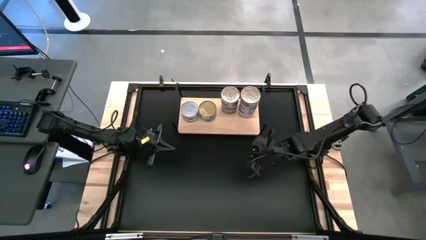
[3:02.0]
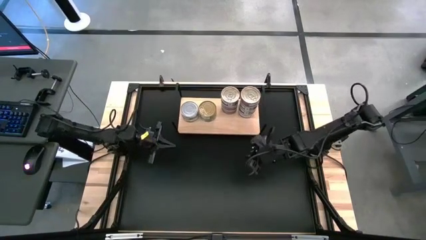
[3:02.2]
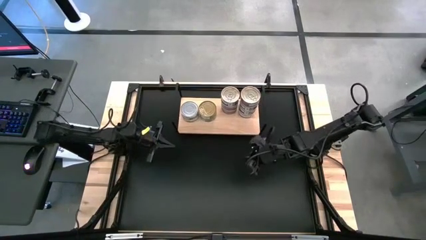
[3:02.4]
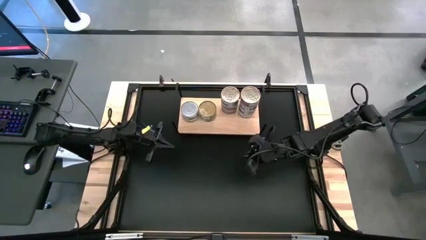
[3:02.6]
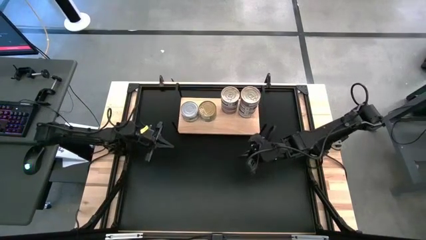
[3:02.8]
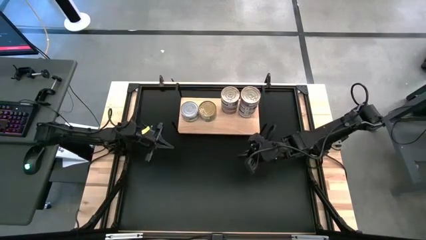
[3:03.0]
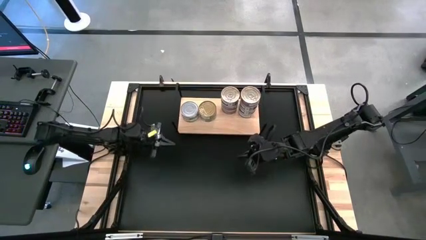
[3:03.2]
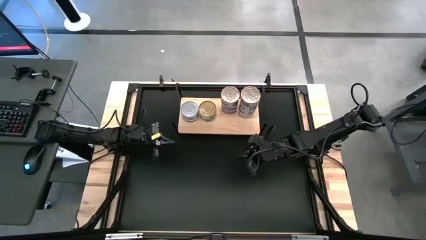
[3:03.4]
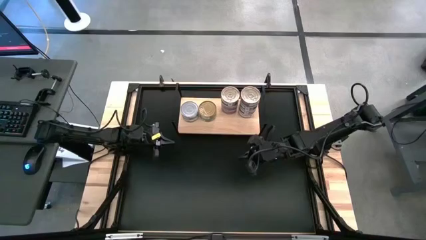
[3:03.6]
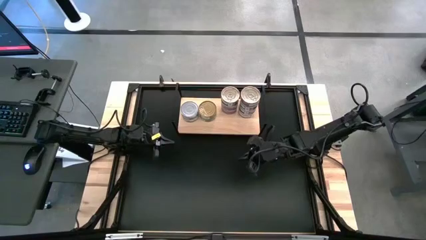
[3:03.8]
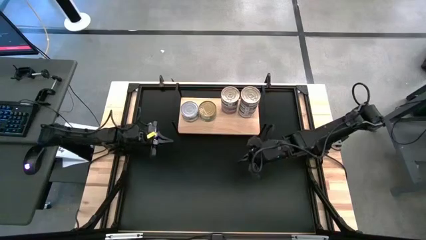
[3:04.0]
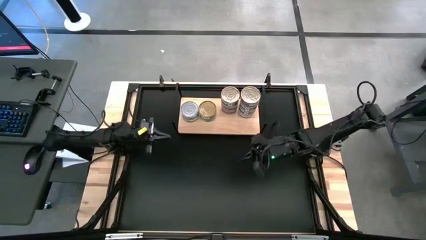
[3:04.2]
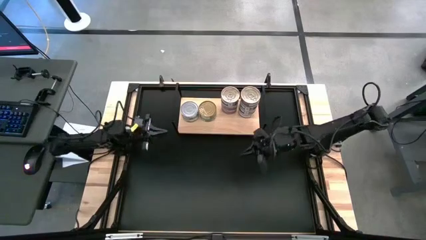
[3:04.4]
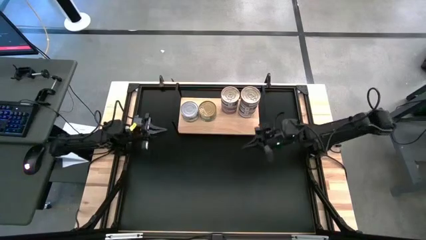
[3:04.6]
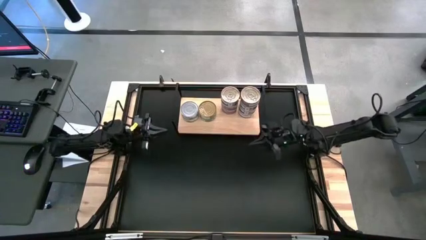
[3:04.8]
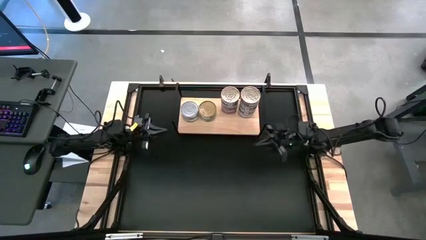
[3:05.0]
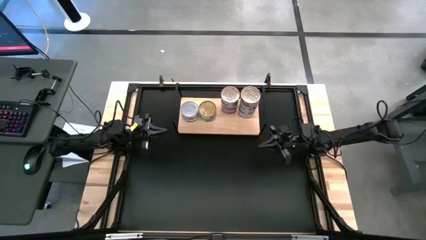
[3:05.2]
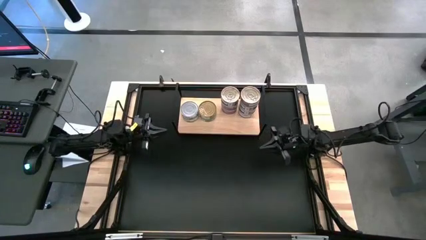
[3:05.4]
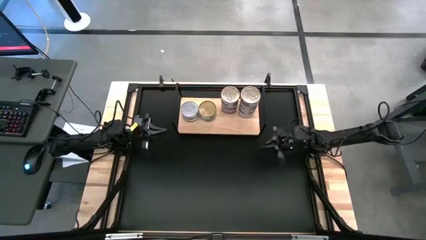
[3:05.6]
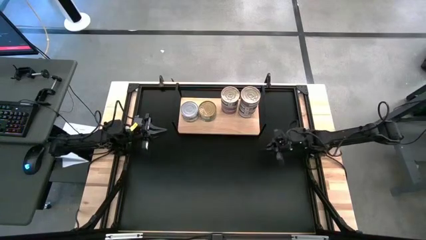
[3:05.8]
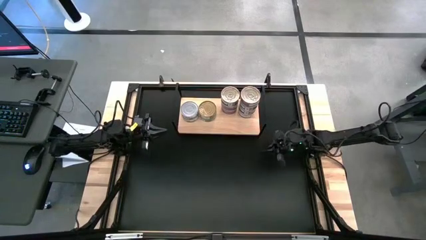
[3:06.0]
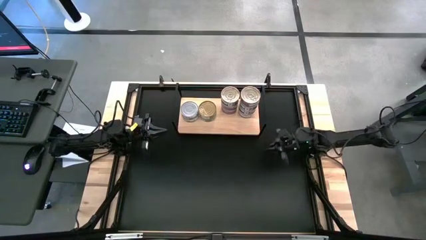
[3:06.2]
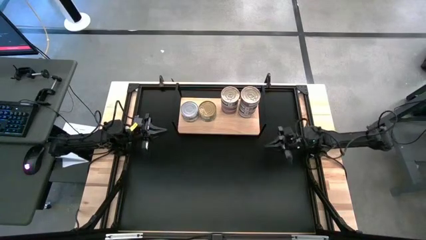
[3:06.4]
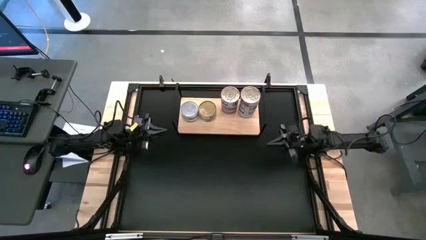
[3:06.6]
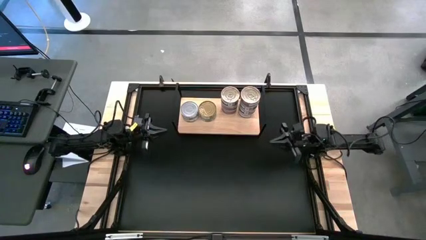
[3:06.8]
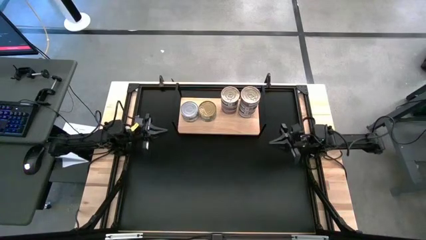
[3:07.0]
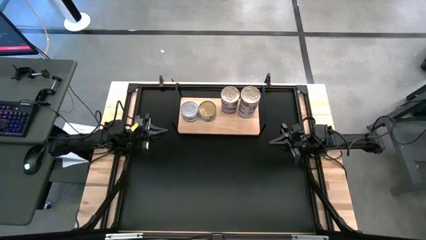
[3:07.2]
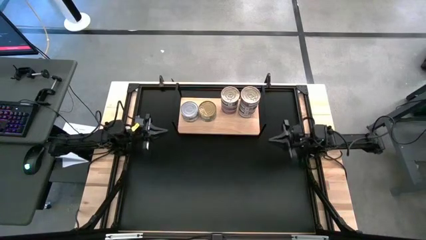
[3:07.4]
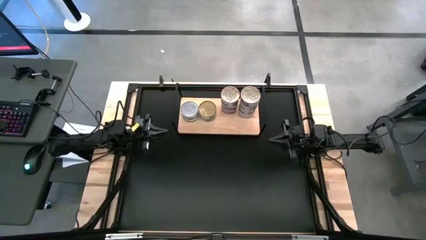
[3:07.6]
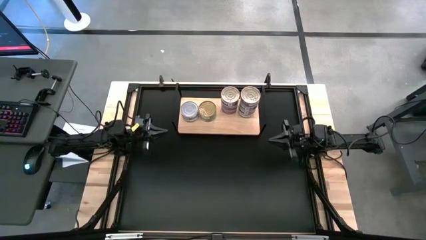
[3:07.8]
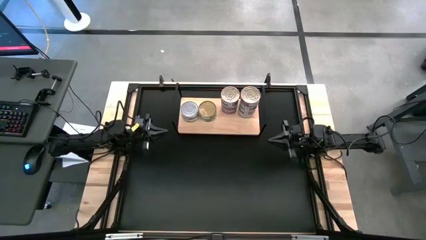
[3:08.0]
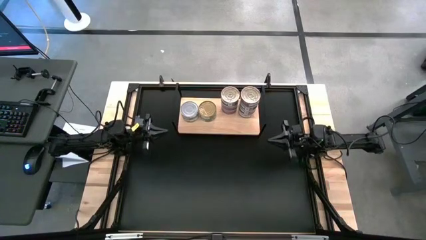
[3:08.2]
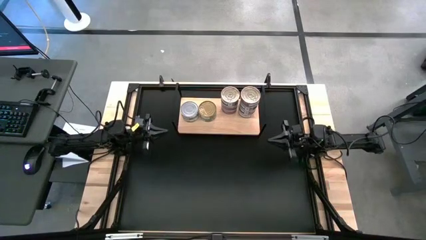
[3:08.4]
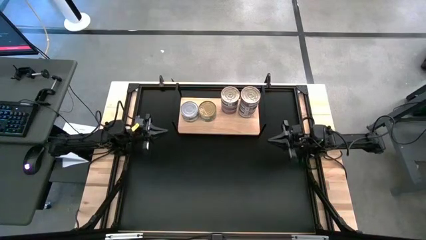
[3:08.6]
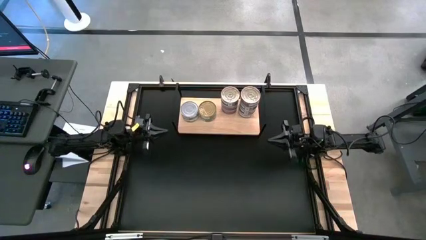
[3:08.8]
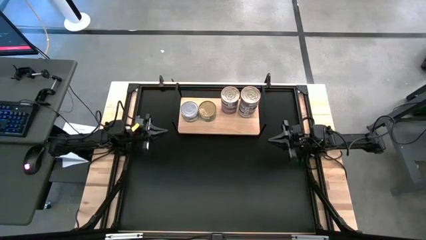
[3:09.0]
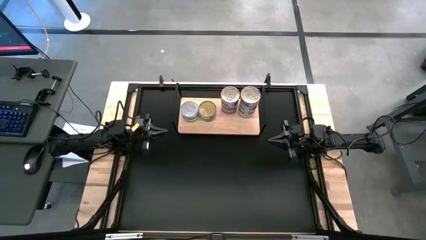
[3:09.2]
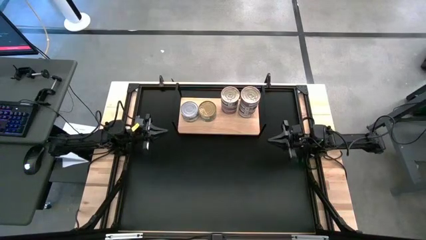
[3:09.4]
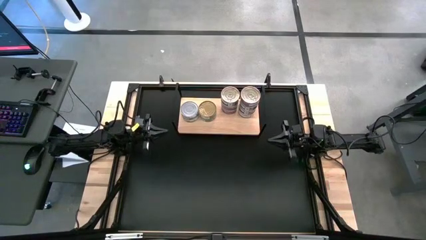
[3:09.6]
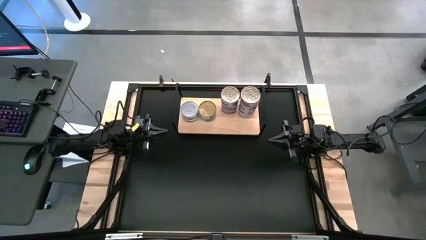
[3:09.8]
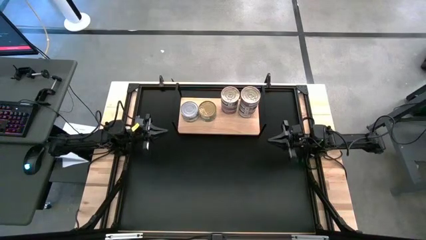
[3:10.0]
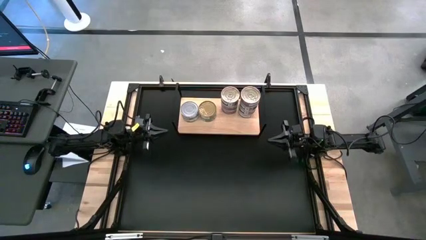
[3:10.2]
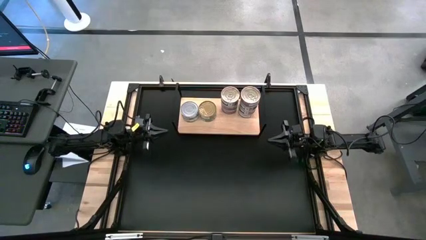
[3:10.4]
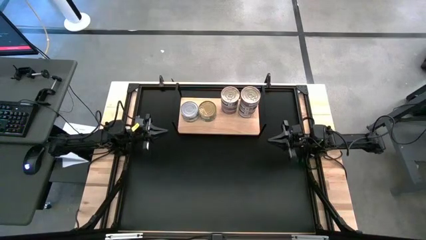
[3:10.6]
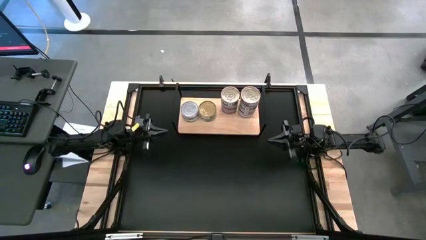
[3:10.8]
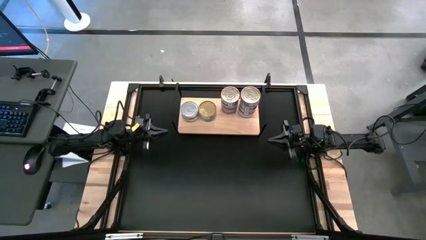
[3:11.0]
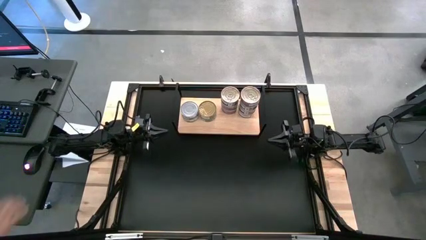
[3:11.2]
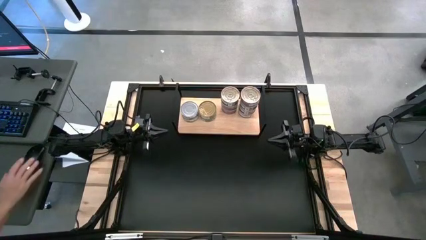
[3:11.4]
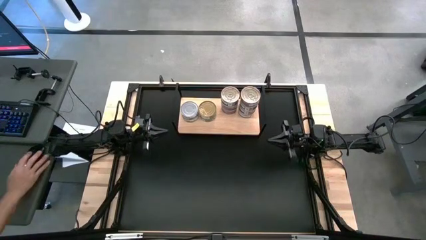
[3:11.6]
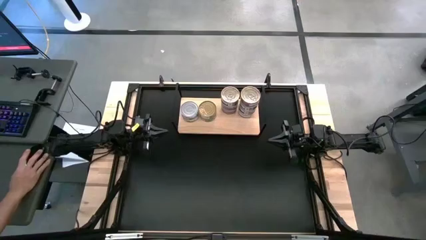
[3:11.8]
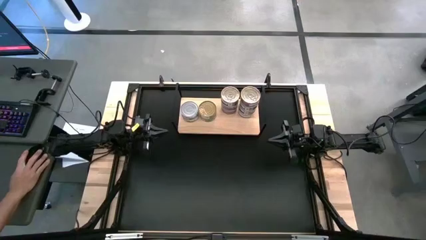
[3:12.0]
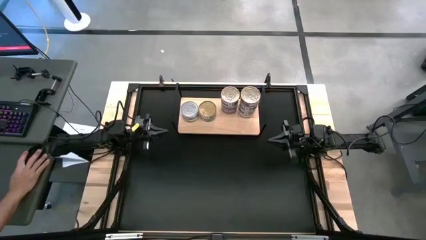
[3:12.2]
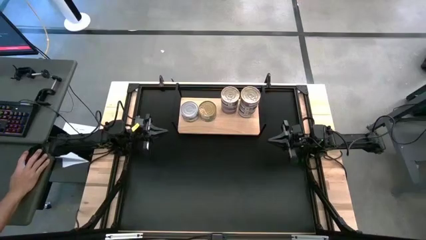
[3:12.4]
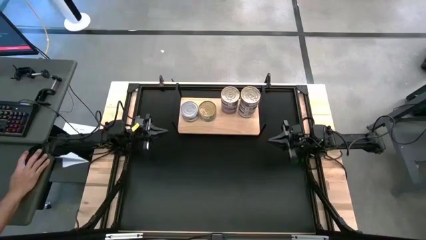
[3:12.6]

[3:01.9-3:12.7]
Task: Stack canned seafood by type on shelf
Return to Home Position

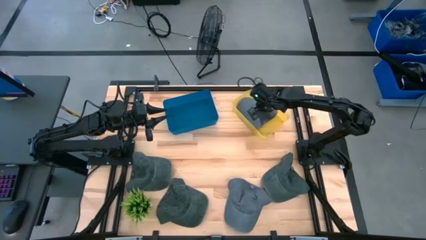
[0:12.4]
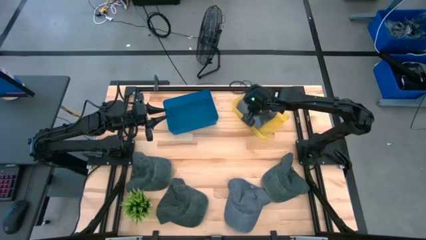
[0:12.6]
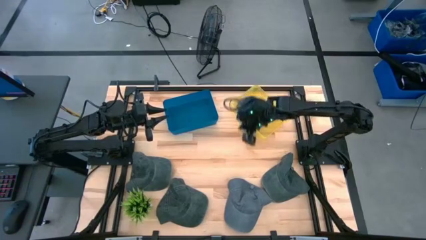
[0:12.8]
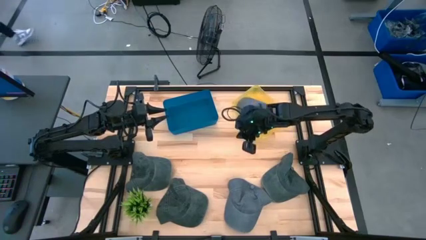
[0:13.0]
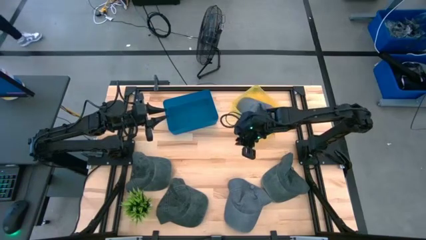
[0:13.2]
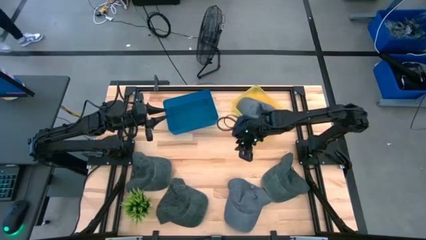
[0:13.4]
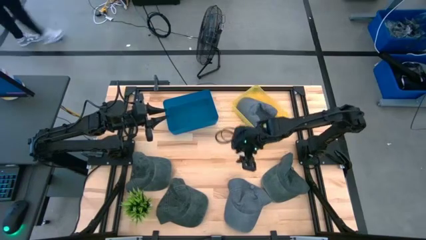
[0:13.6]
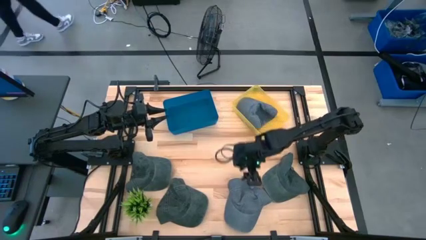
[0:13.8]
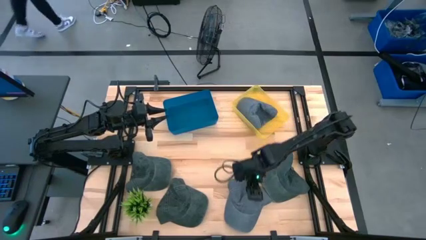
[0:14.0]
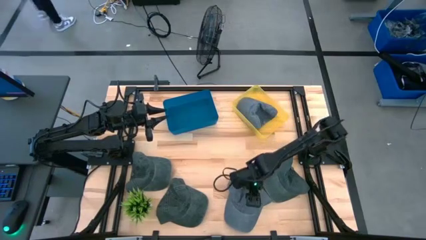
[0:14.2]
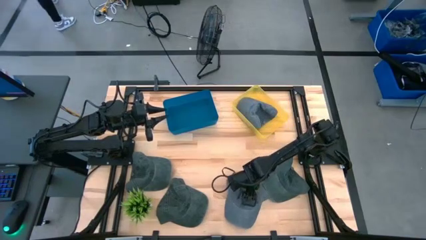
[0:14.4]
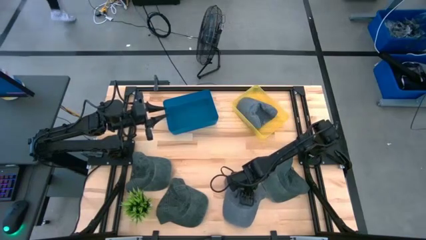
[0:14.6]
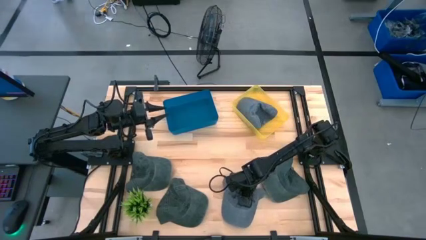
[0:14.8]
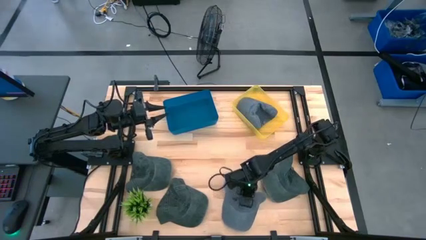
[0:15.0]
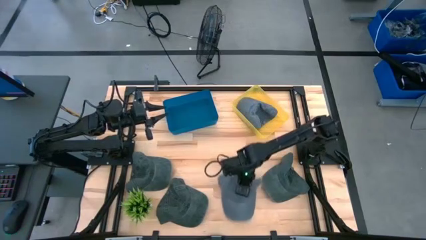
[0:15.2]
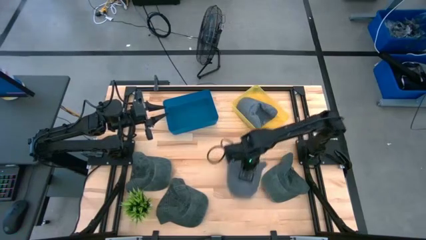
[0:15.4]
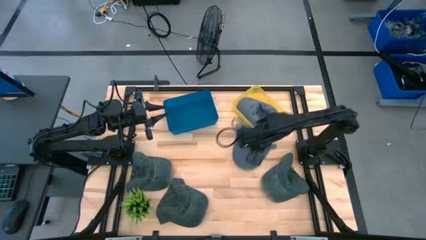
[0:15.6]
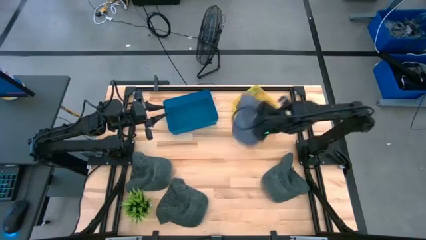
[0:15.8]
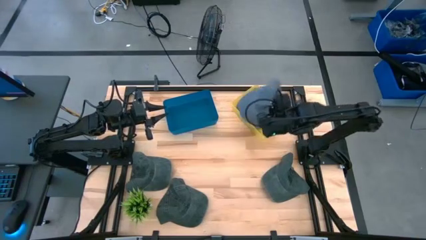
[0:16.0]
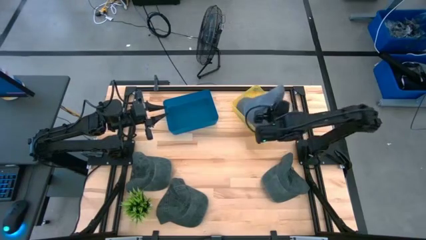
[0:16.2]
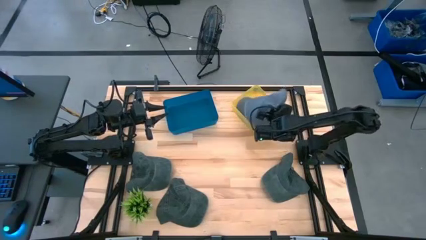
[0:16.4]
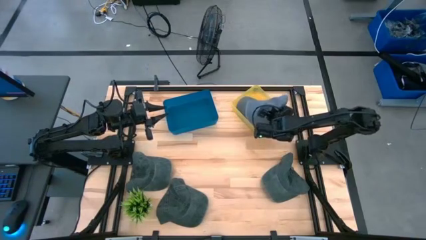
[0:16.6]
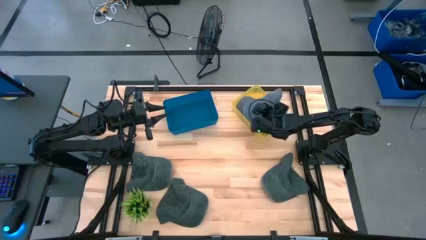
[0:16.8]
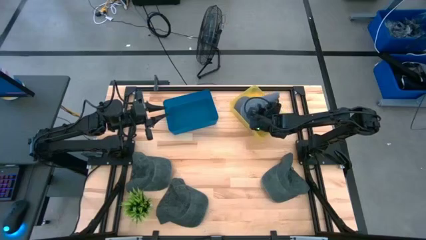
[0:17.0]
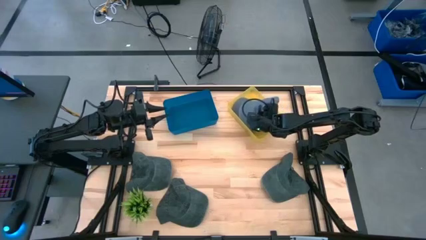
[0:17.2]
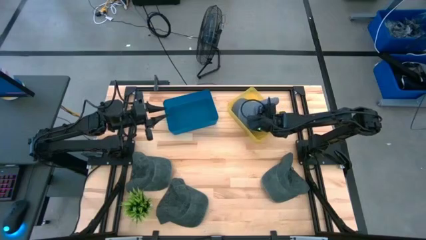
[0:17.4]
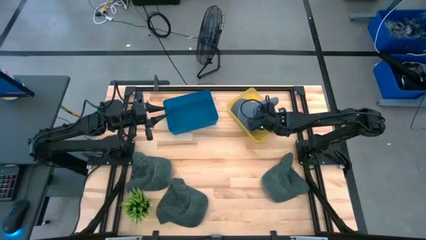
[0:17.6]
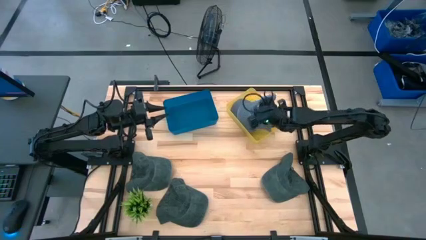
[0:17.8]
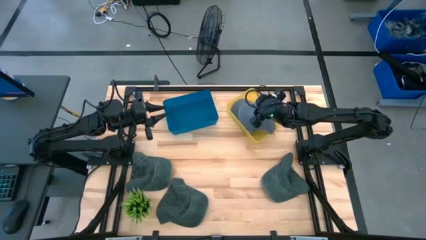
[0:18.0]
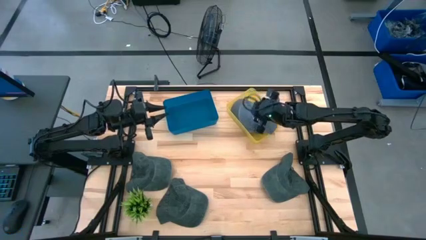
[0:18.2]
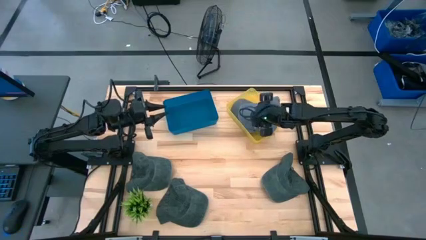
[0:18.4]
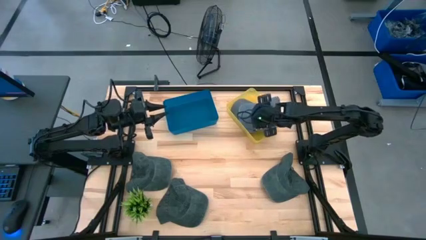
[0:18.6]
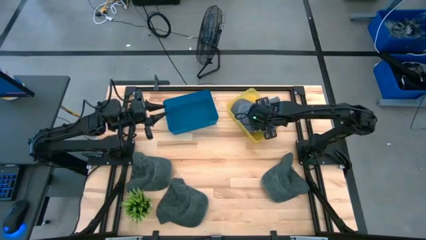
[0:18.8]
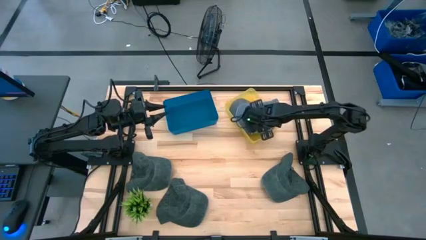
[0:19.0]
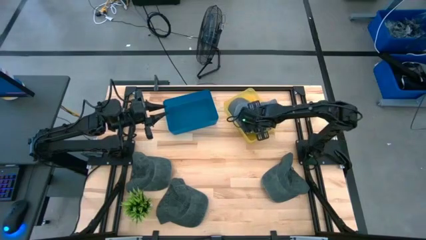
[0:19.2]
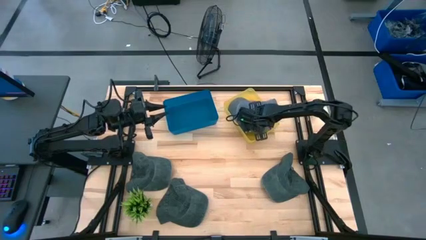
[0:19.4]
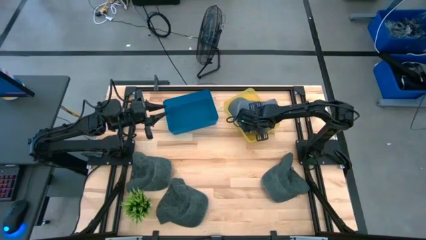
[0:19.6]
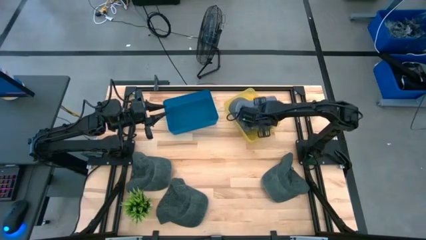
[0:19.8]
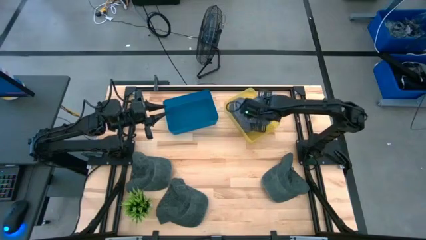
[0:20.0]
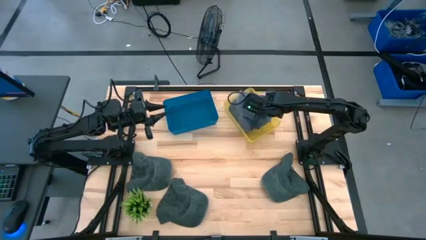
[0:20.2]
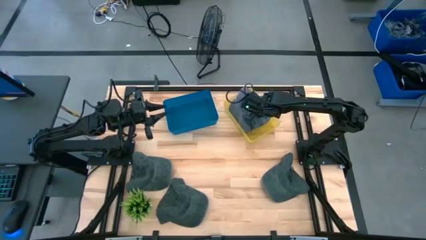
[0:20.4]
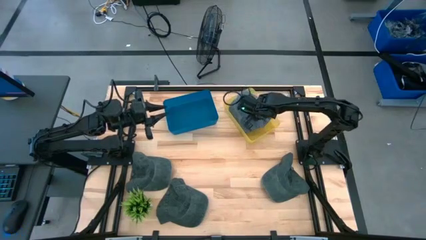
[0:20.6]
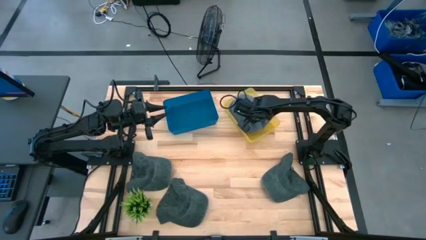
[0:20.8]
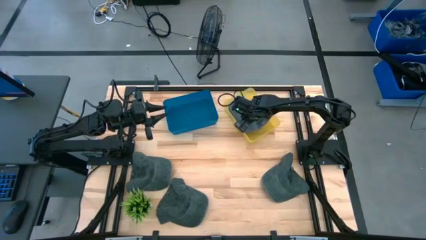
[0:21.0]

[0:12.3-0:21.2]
Task: Pick & Place hat
Put the blue cap into the yellow bin
